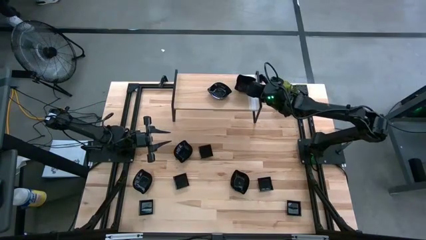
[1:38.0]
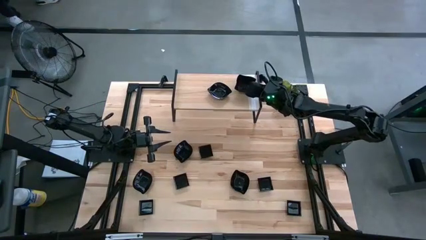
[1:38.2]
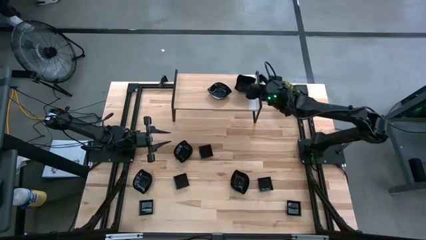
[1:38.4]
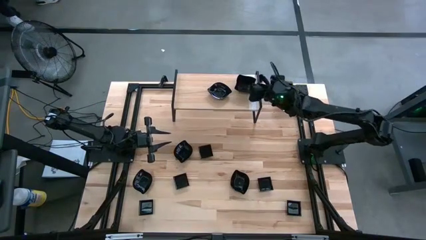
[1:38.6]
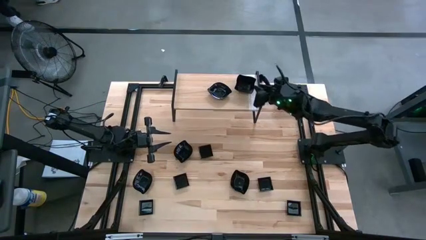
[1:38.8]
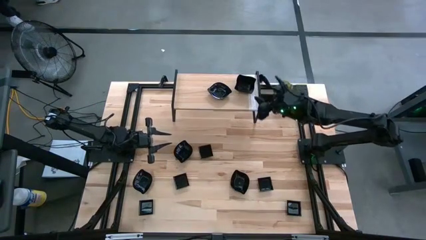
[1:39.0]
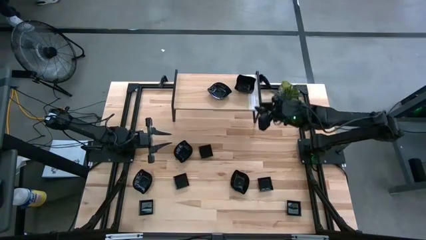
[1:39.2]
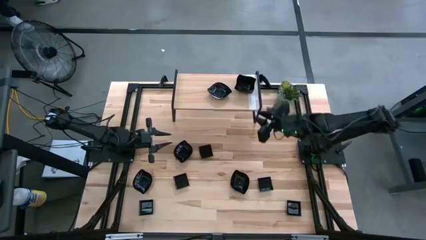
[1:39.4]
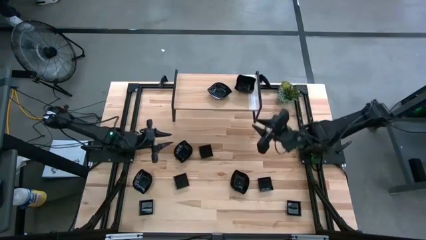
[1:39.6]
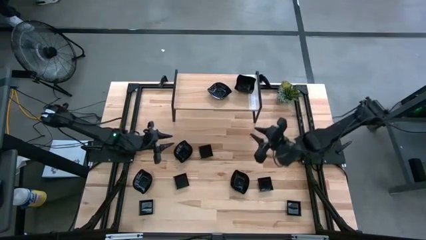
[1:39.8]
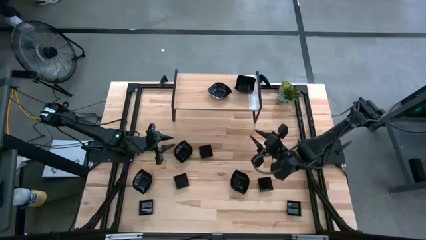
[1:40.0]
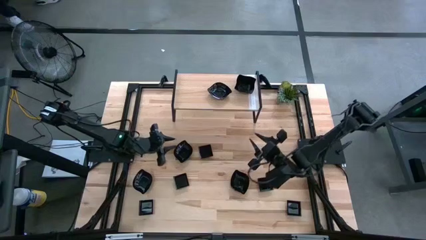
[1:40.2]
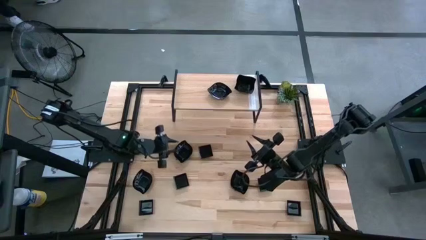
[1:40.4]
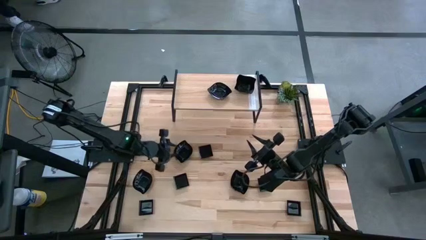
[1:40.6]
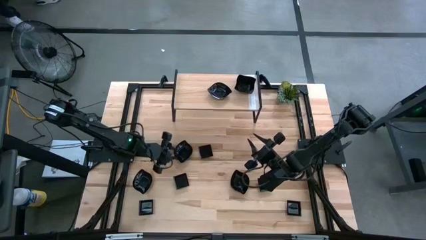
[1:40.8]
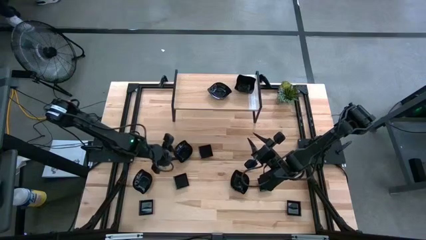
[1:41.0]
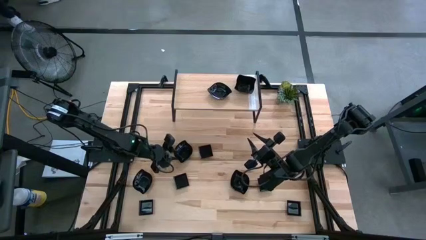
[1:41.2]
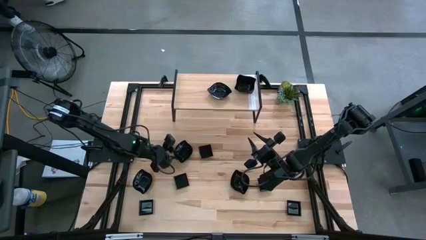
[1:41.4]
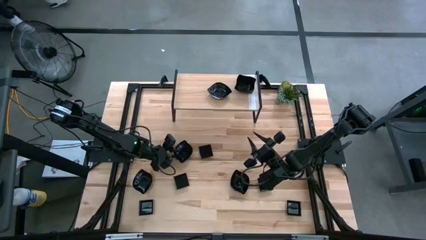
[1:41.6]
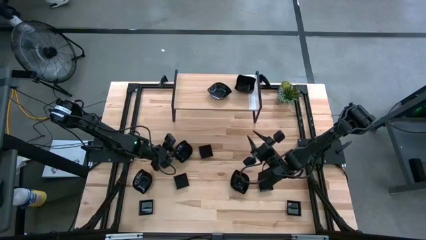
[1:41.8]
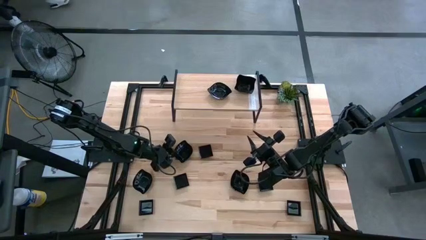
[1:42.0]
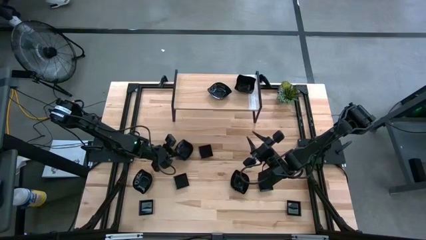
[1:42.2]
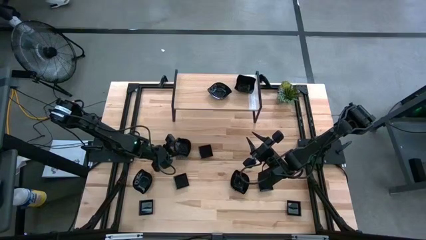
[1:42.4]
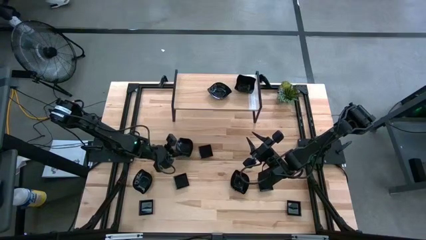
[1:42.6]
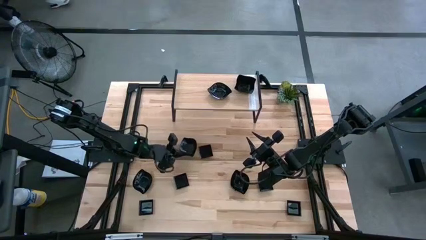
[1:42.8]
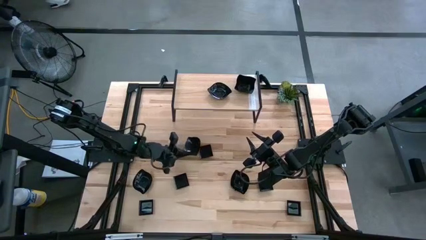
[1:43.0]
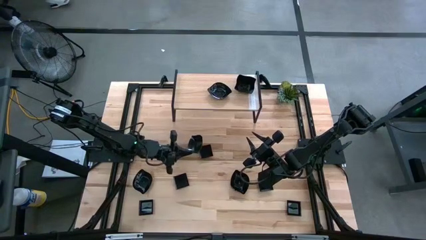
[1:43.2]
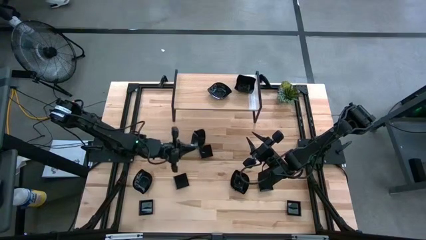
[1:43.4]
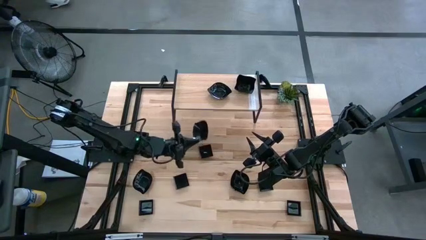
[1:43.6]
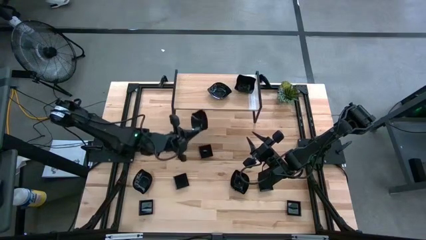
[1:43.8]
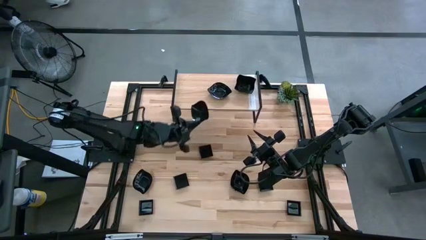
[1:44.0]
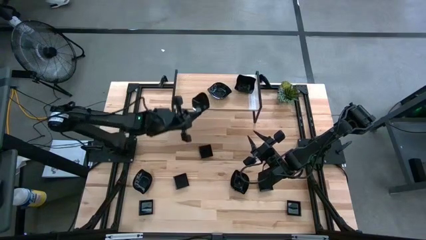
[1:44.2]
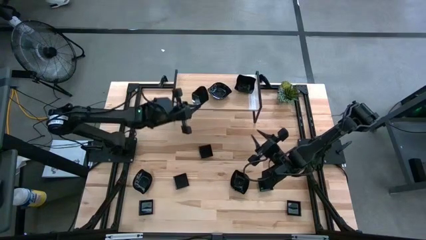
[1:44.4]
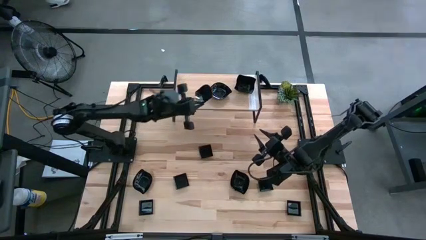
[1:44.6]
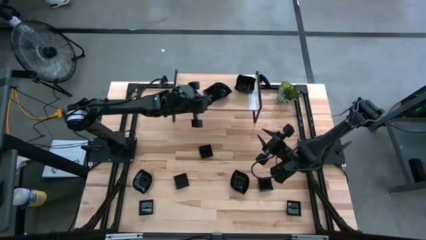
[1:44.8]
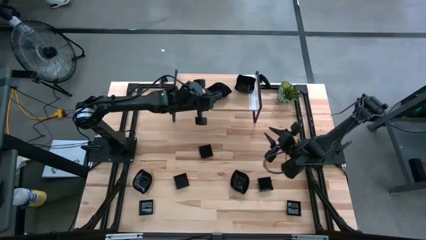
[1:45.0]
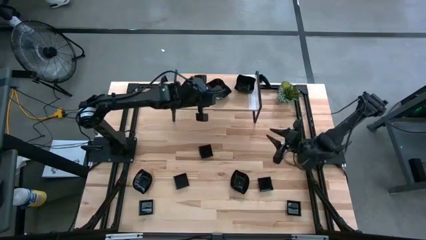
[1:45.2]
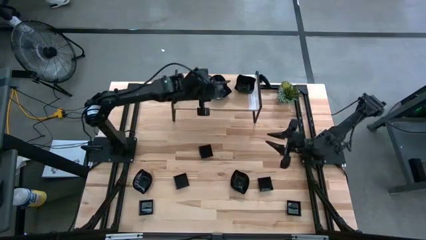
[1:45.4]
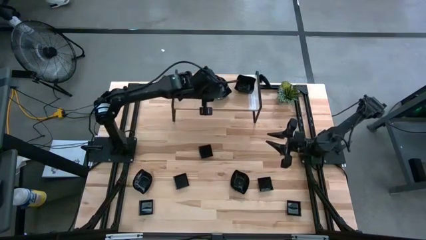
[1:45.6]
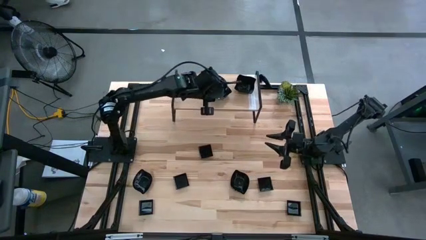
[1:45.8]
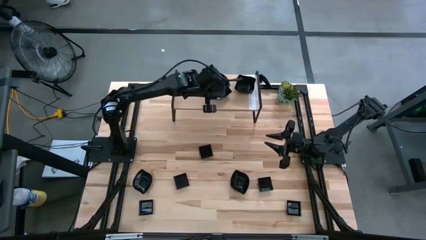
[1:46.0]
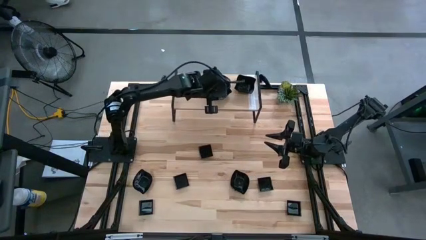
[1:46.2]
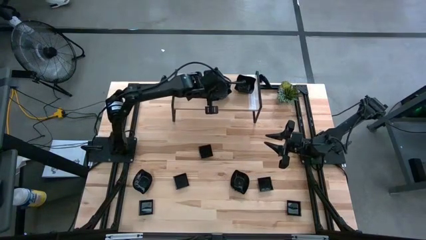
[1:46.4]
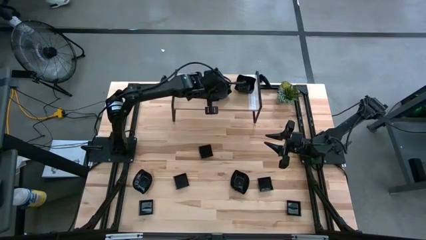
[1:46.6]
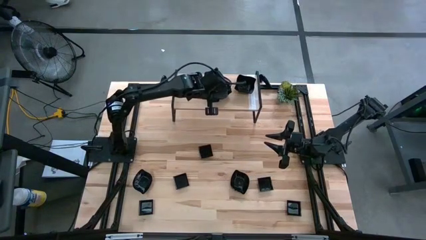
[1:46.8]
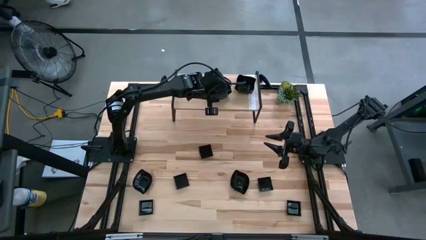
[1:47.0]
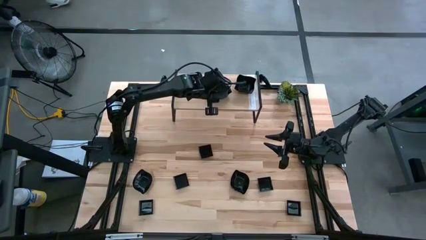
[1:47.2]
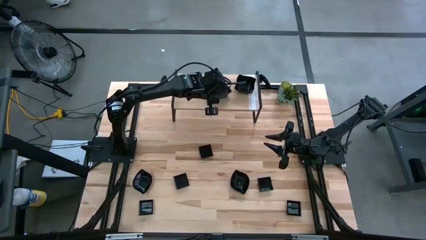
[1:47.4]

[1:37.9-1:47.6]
Task: Pick & Place Mini shaped plates
Stack the leaf-shaped plate on top of the other leaf-shaped plates on the shelf

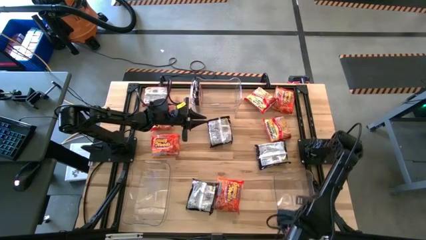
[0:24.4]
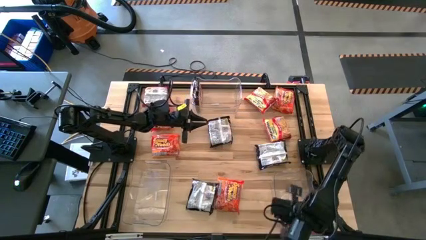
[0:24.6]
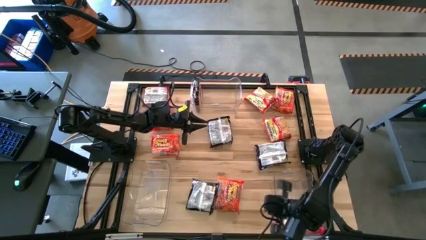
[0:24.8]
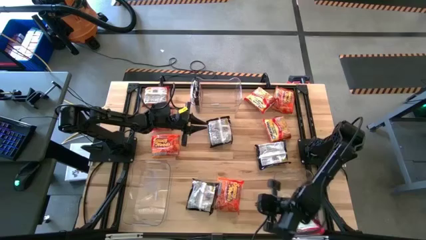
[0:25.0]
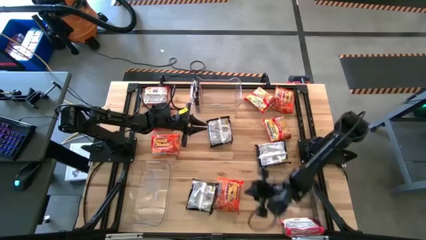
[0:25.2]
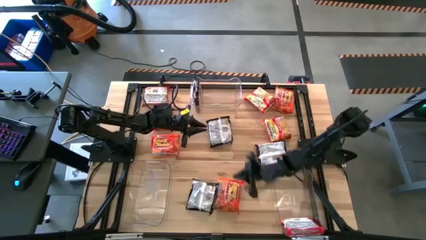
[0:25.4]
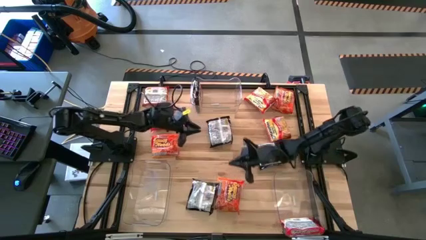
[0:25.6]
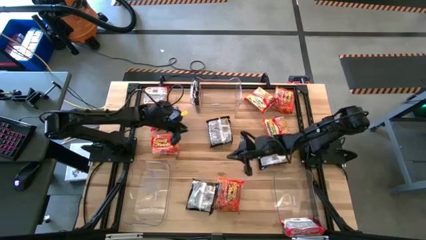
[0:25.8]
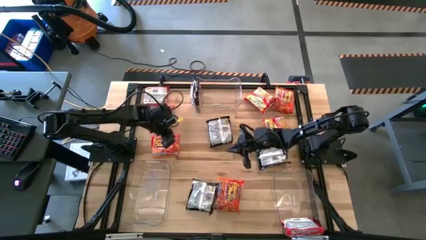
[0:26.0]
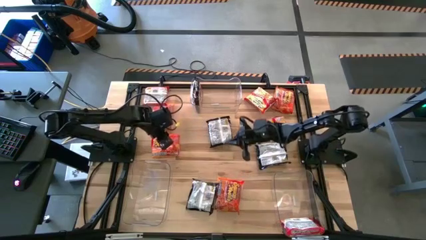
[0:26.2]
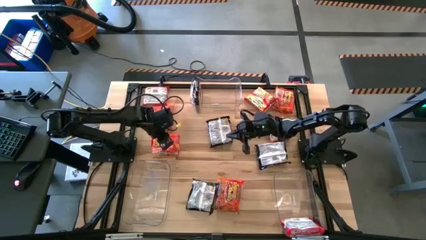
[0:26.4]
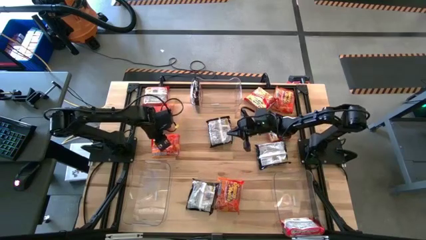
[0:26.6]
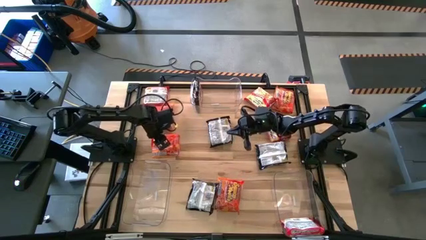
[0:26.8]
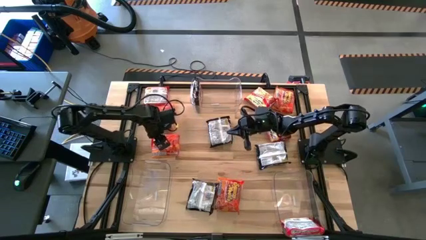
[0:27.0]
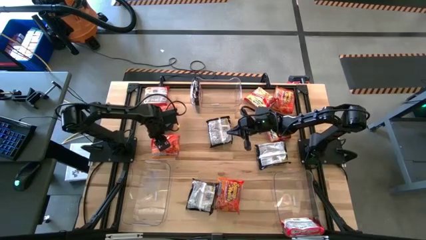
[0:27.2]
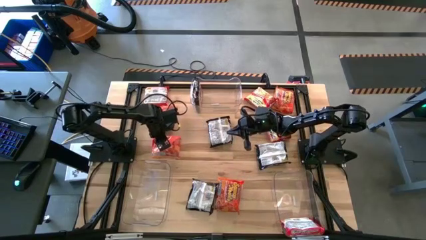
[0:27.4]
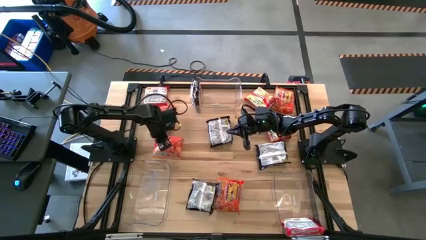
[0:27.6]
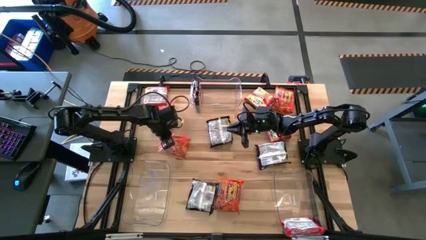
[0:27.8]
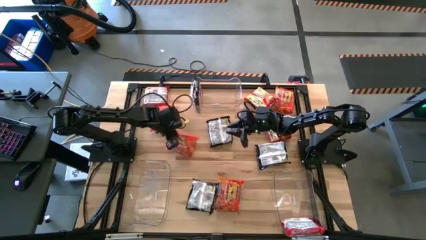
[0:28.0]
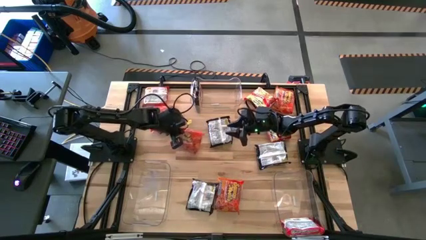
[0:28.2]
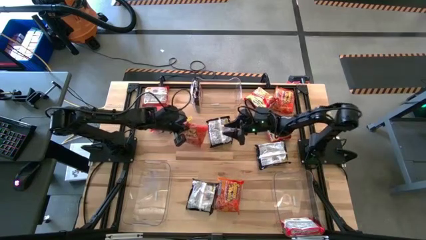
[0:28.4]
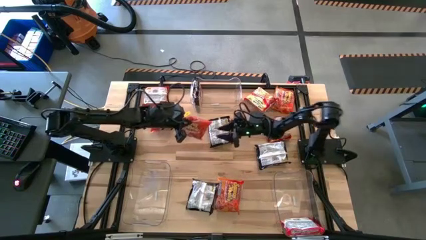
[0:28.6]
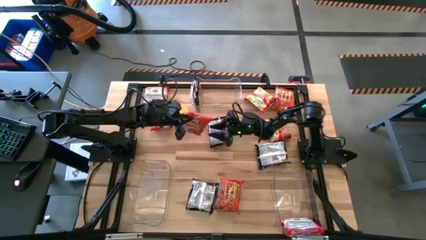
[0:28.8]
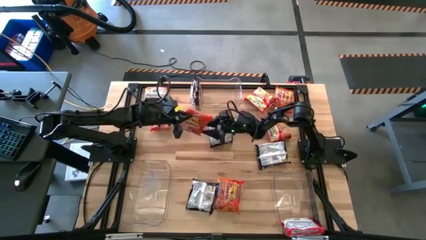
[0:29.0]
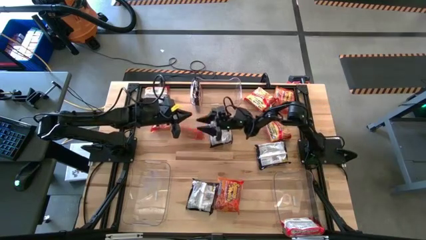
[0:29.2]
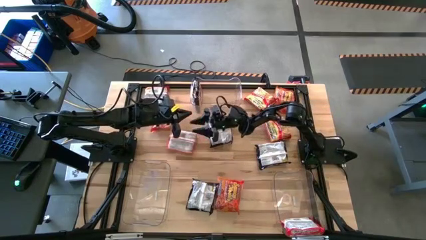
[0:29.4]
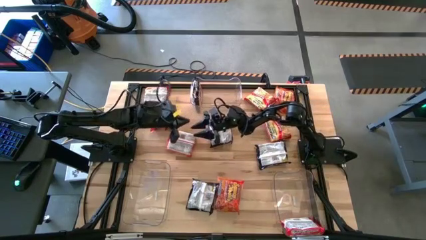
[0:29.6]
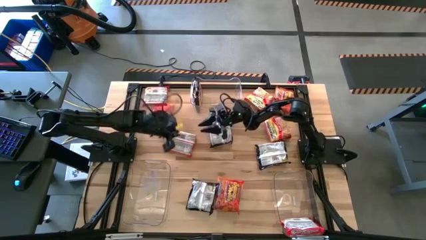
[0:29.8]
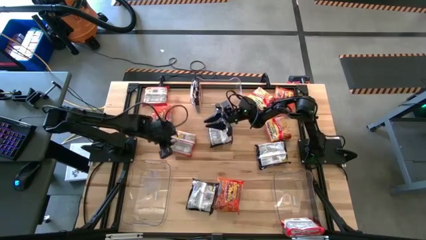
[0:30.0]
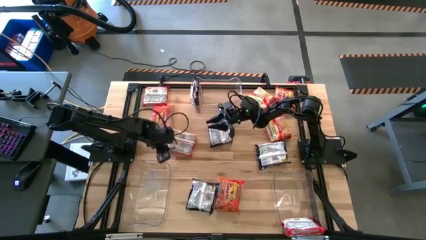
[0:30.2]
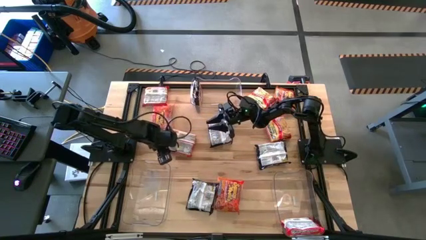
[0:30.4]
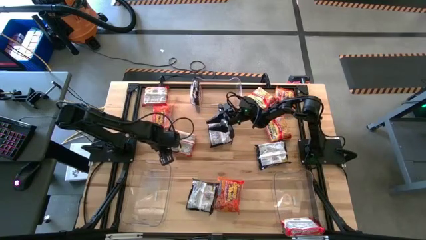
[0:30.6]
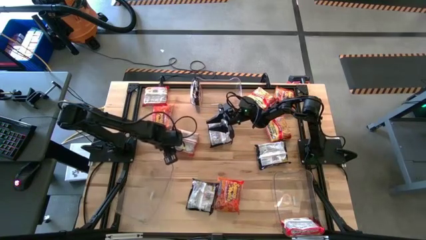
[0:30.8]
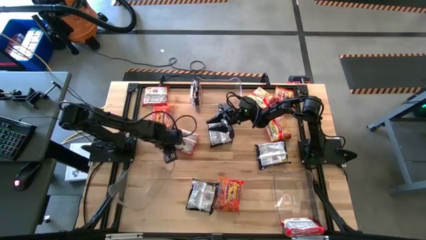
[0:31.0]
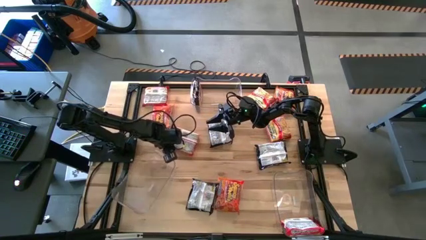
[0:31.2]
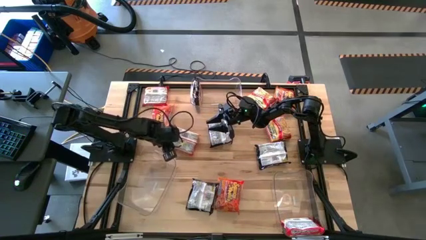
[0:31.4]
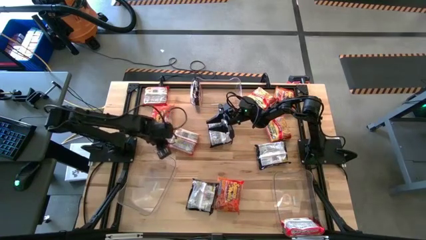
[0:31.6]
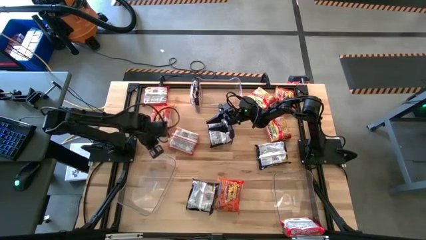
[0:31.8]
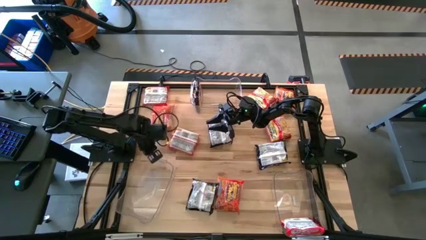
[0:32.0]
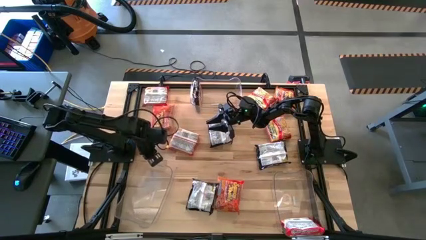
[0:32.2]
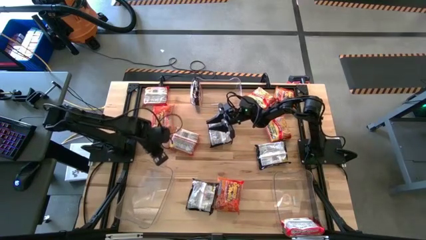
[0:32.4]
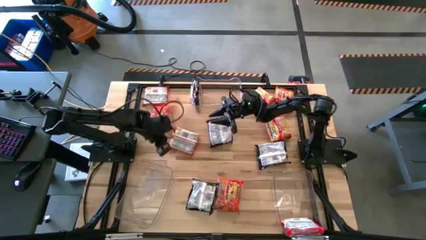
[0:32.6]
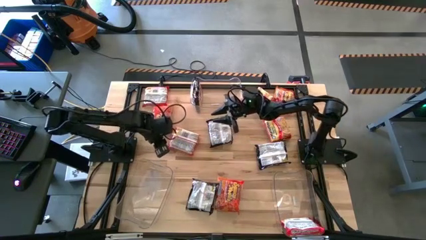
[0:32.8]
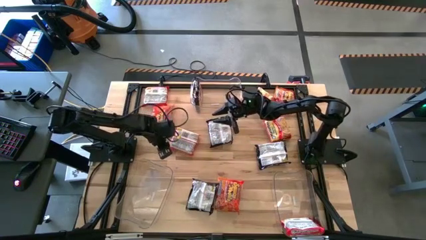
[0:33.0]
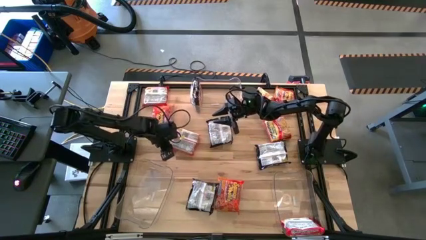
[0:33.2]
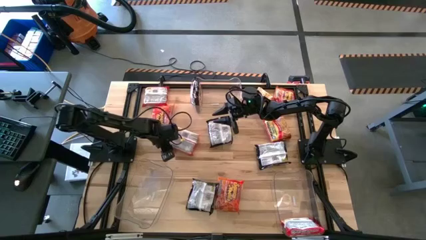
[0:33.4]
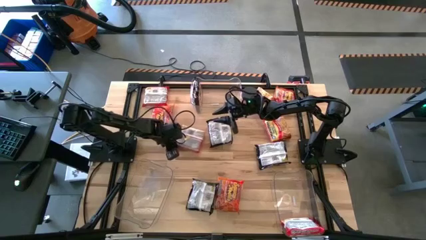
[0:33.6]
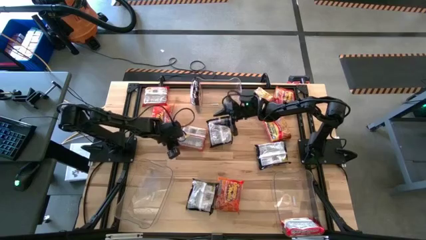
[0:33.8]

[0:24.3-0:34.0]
Task: Sort Maruchan noodles
Put the middle left orange noodle pack into the bottom left transparent bin
